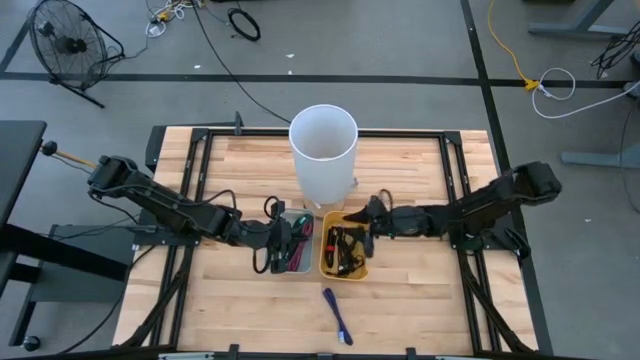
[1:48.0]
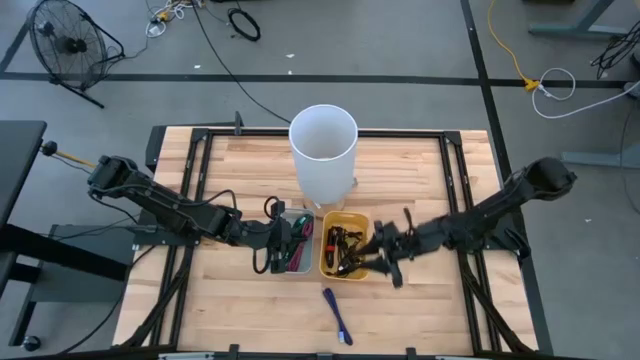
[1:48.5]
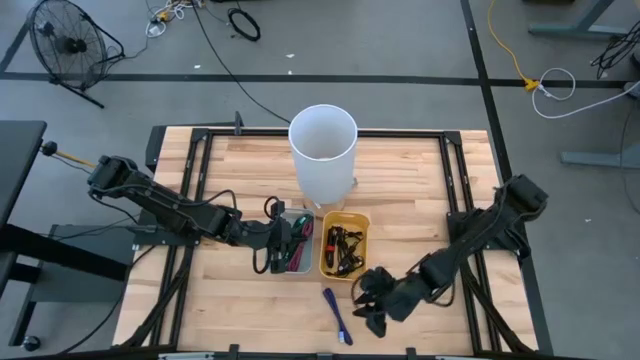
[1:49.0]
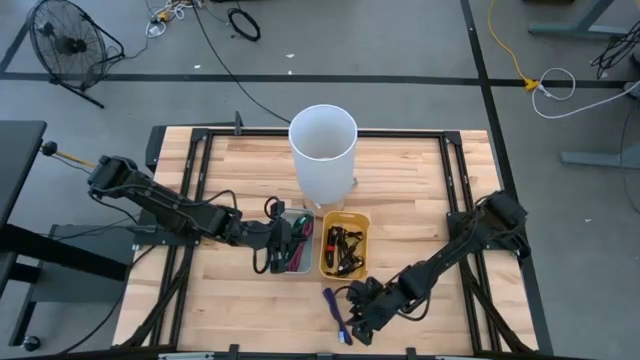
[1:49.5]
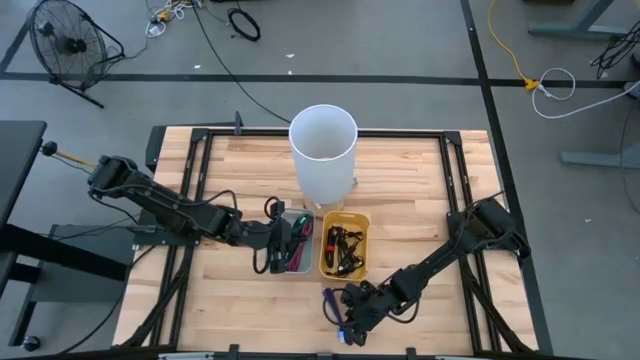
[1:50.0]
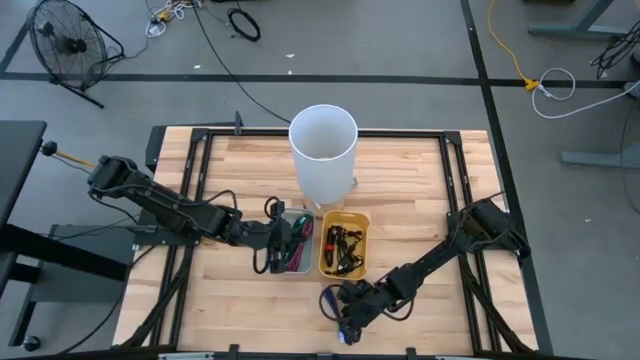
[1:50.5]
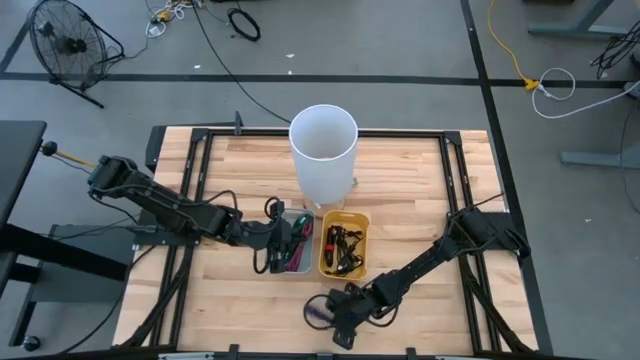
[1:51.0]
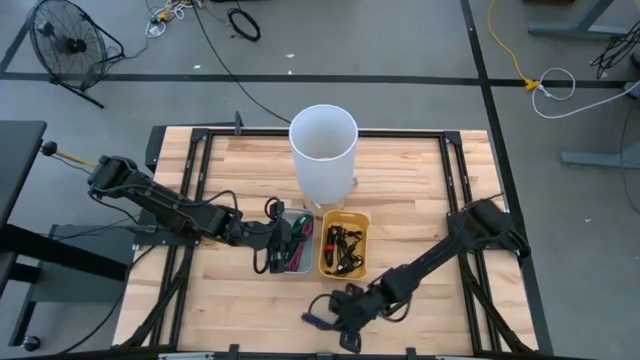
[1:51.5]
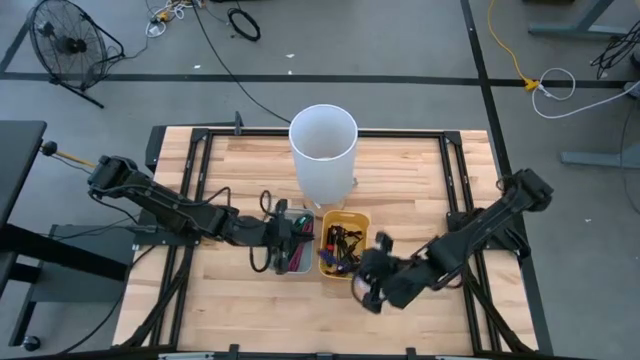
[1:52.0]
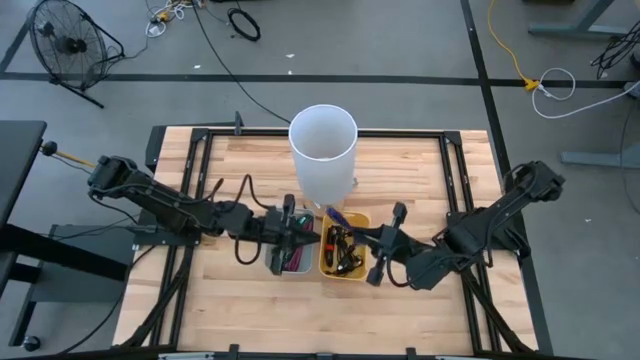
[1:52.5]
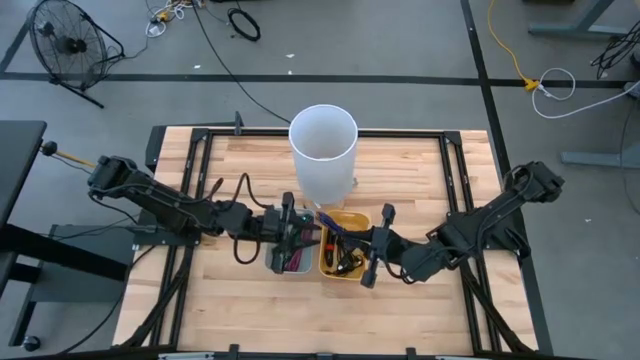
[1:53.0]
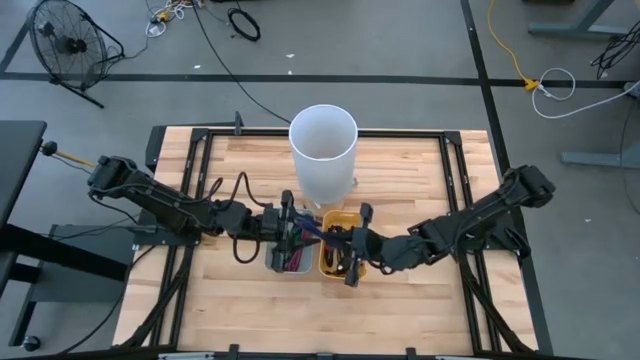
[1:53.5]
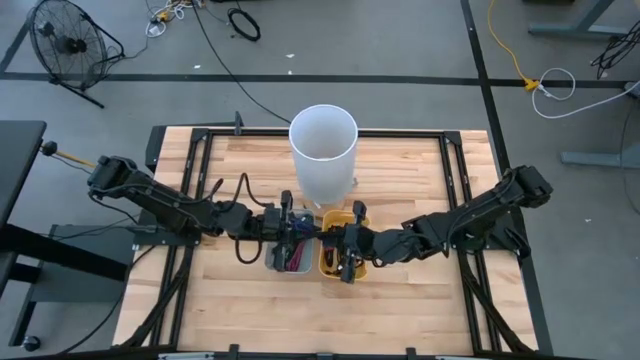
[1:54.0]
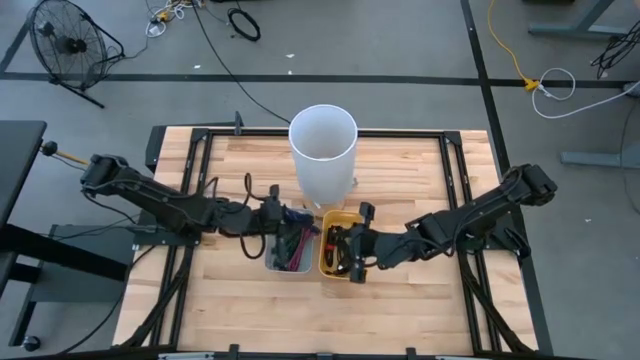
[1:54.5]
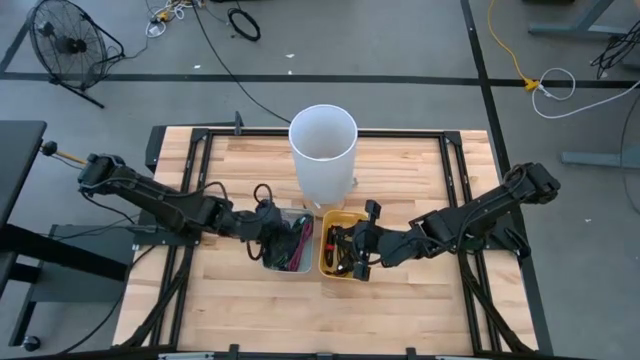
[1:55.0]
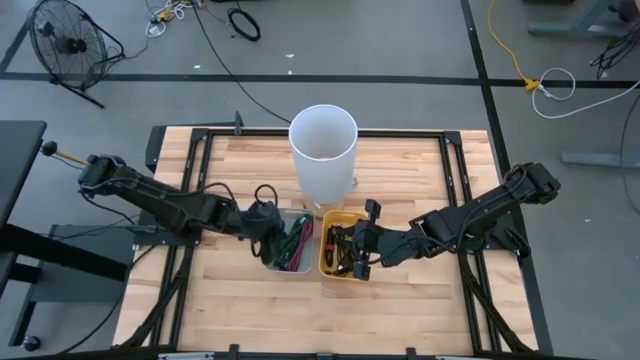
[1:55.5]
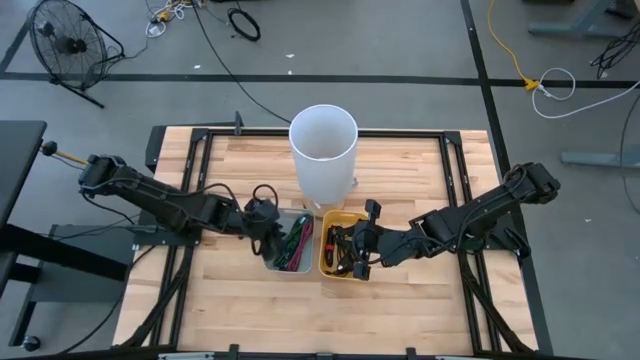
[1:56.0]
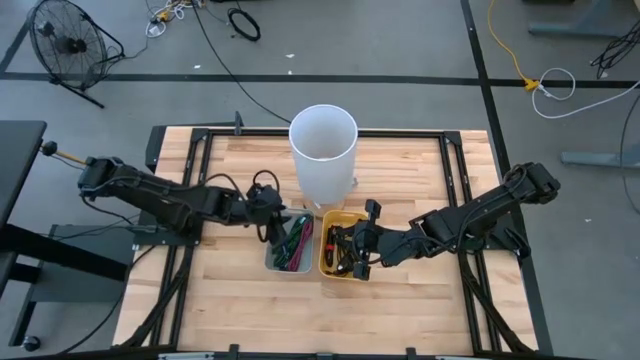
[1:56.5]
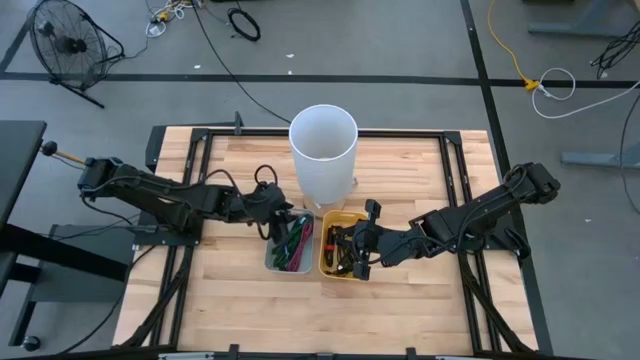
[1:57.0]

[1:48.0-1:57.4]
Task: Pick & Place USB Port
Put the purple charger cable into the gray bin

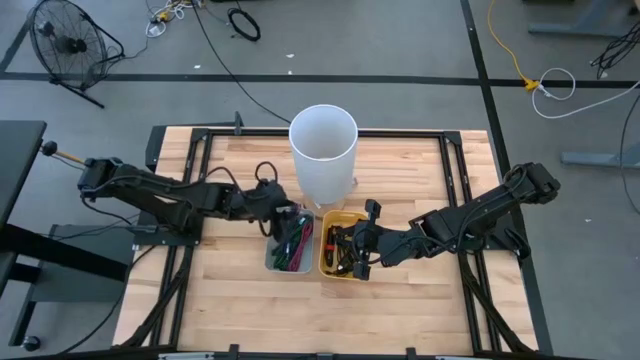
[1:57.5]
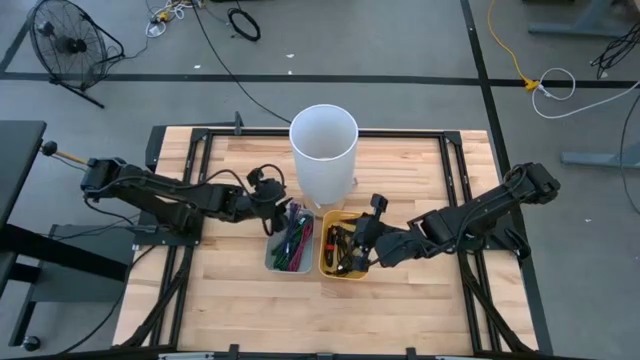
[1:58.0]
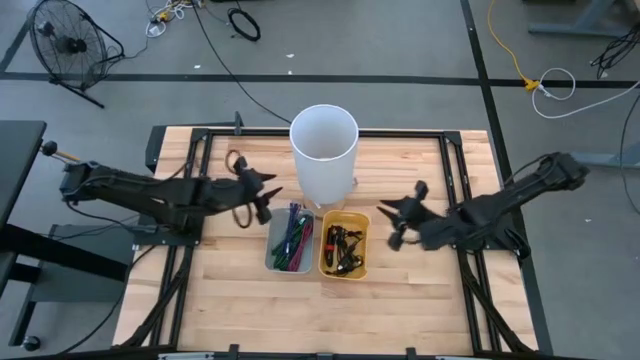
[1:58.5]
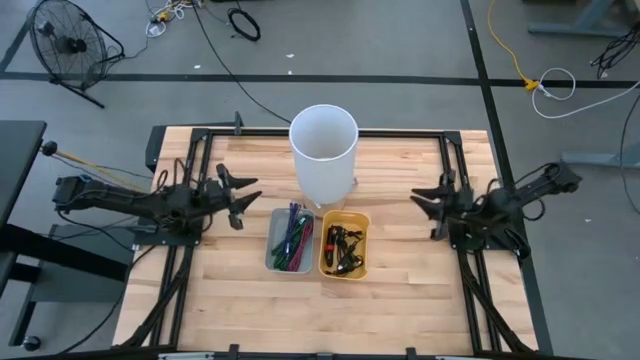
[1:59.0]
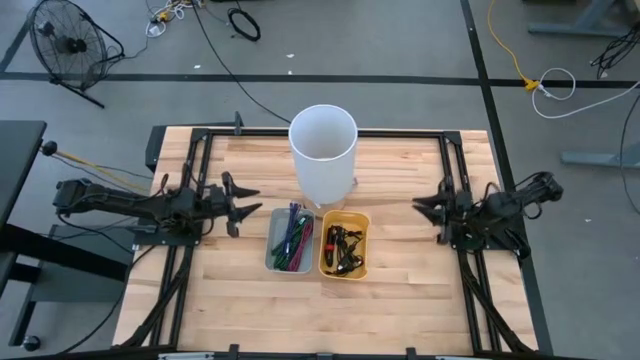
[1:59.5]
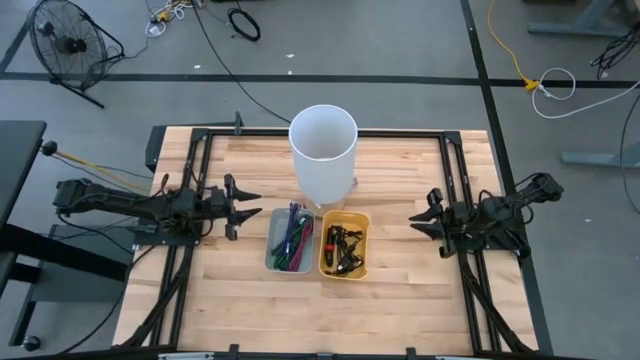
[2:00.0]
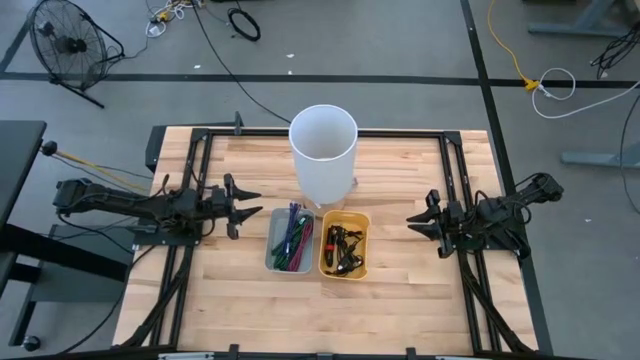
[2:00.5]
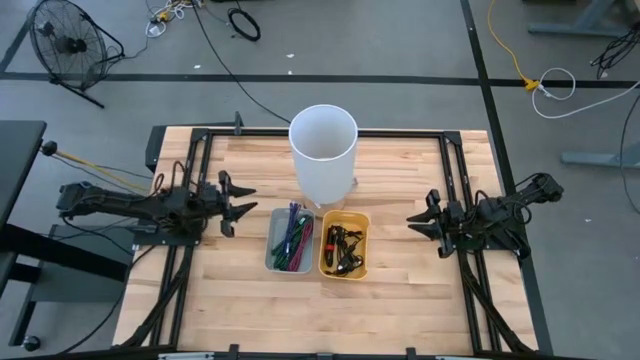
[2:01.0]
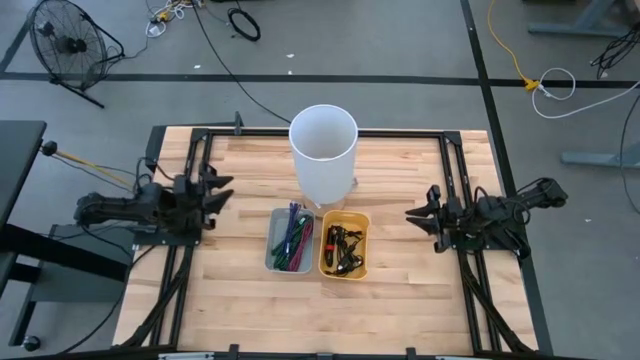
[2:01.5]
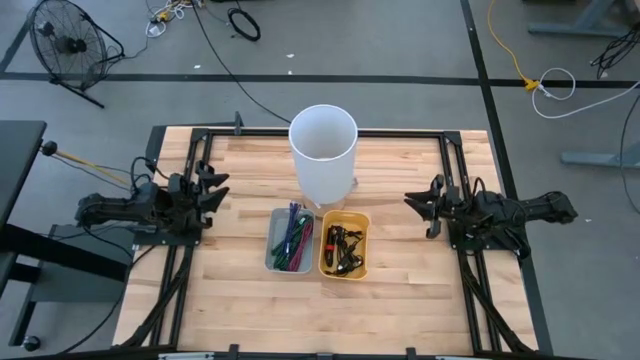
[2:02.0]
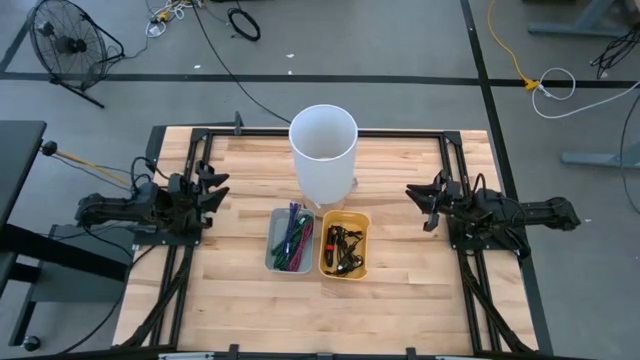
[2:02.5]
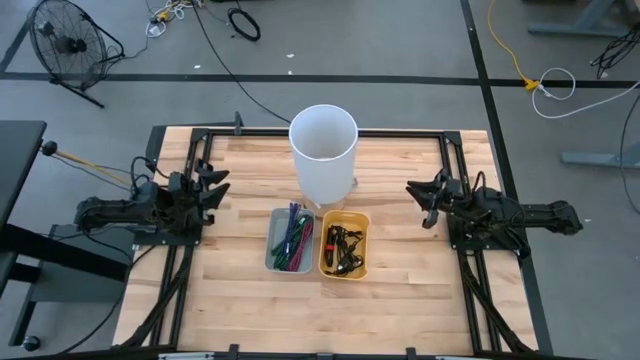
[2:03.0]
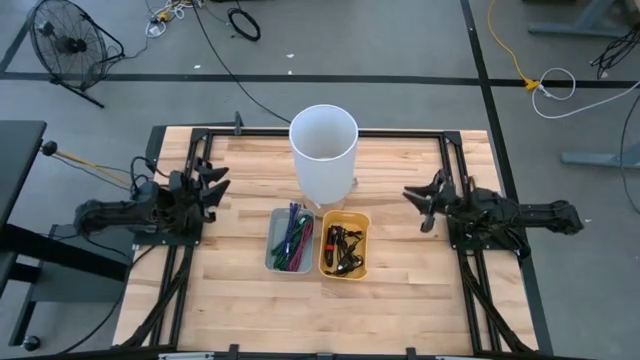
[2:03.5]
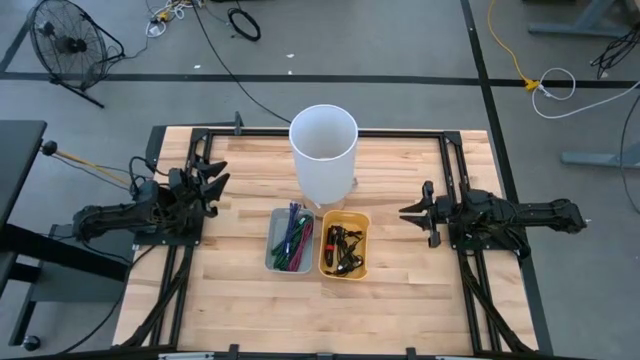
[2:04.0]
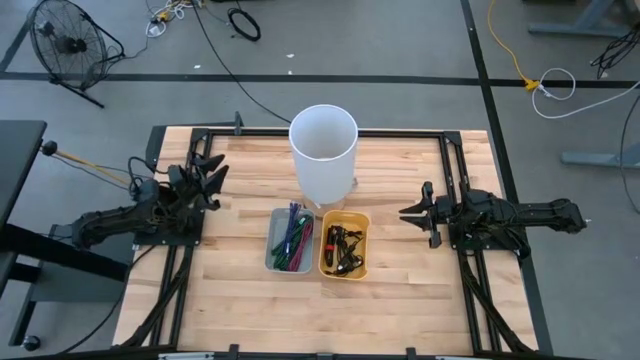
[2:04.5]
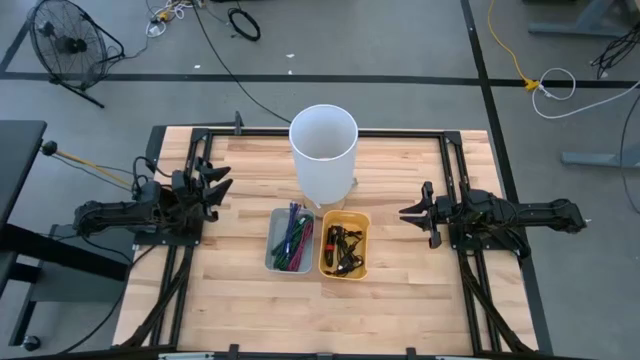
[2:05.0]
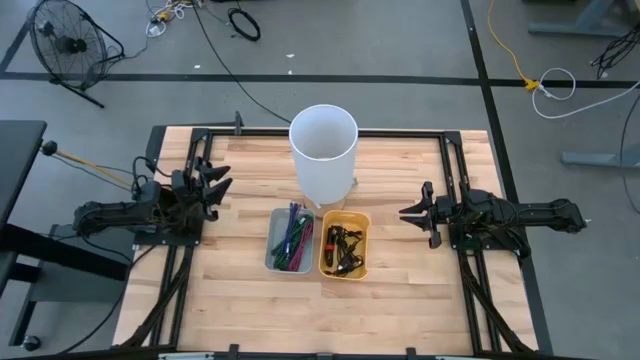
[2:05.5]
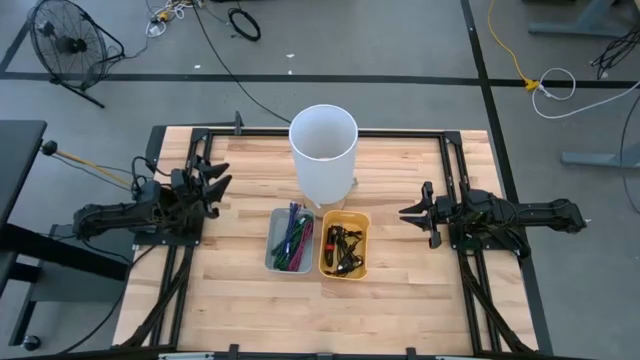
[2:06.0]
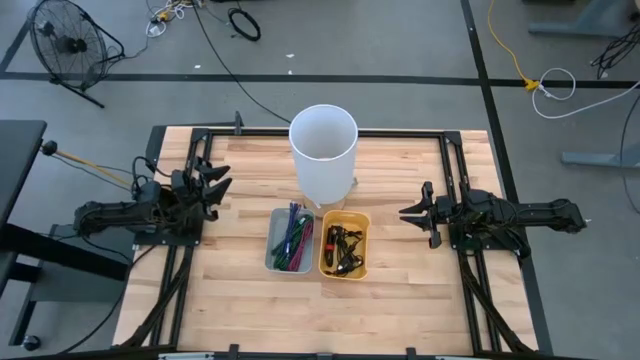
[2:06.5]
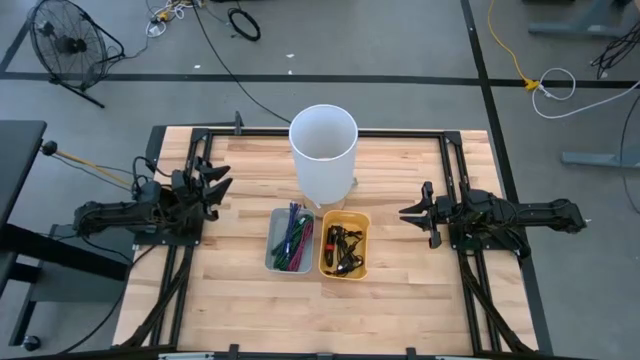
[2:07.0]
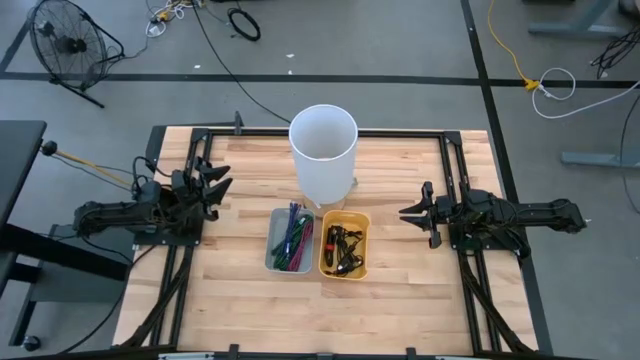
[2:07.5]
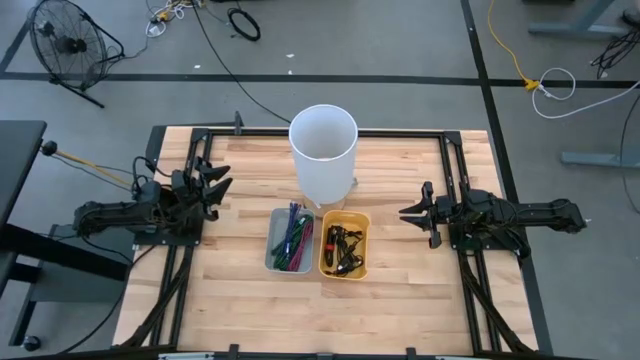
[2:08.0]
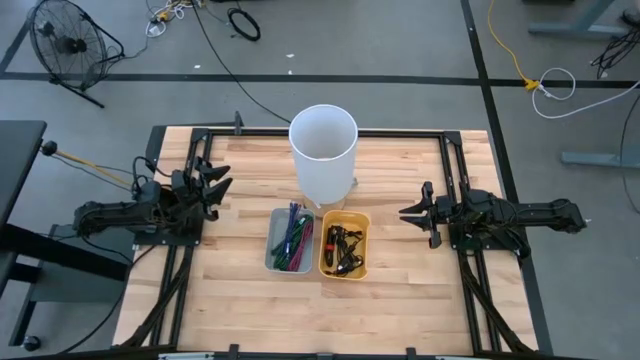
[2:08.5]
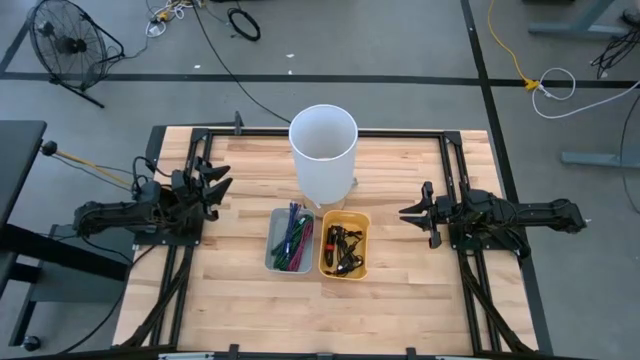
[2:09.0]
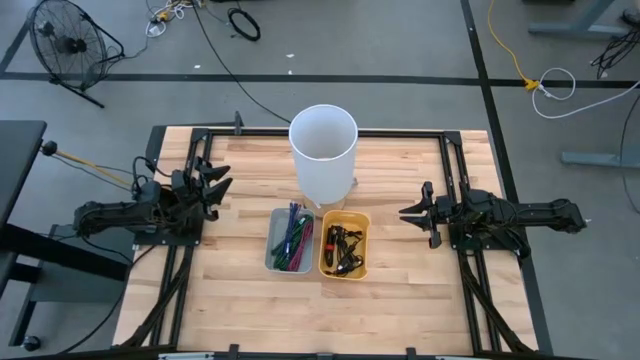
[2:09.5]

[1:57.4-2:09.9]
Return to Home Position
